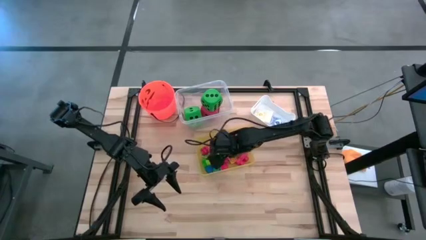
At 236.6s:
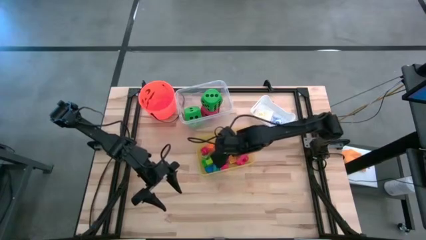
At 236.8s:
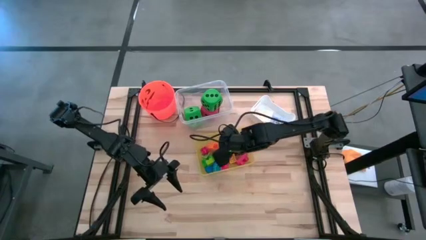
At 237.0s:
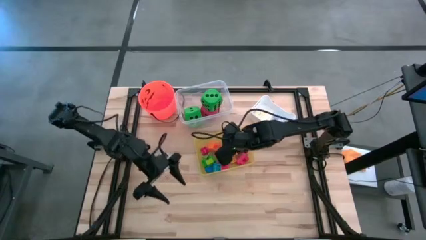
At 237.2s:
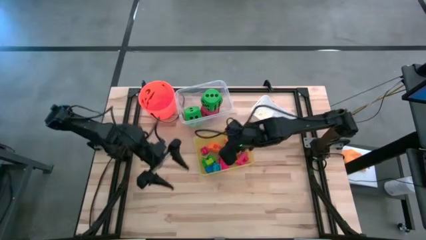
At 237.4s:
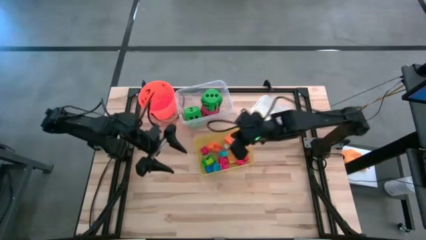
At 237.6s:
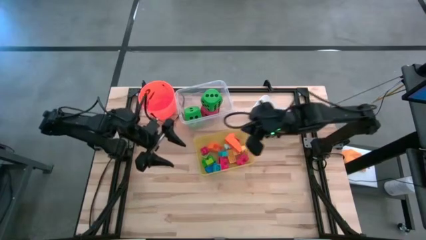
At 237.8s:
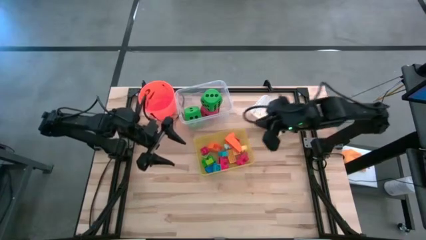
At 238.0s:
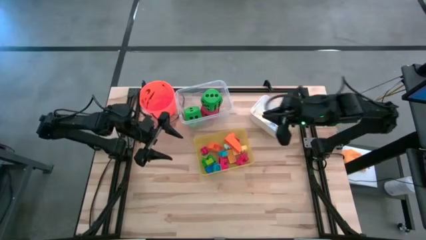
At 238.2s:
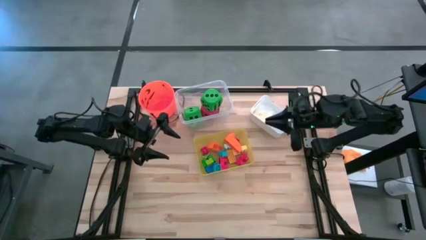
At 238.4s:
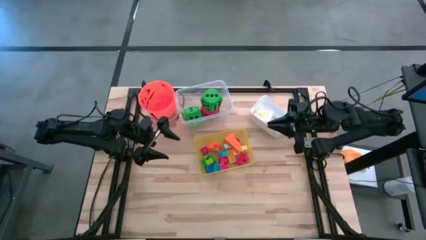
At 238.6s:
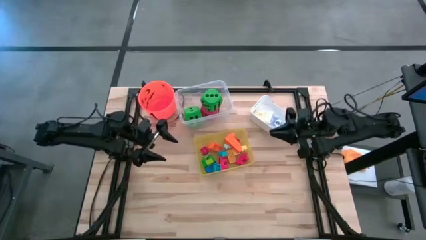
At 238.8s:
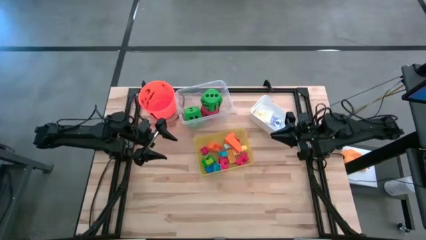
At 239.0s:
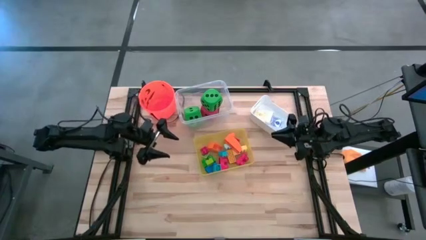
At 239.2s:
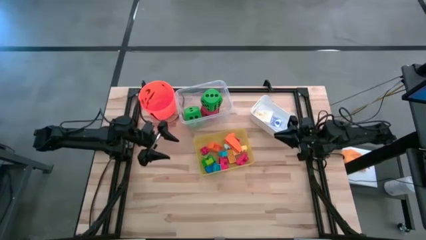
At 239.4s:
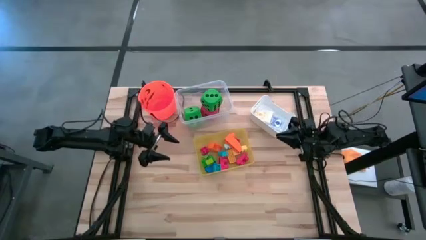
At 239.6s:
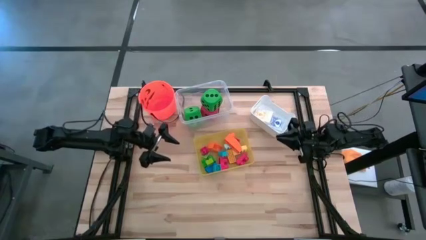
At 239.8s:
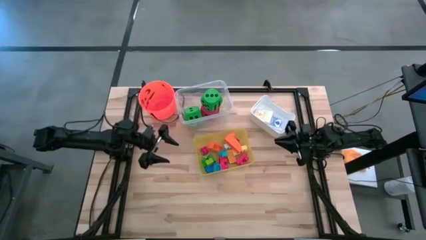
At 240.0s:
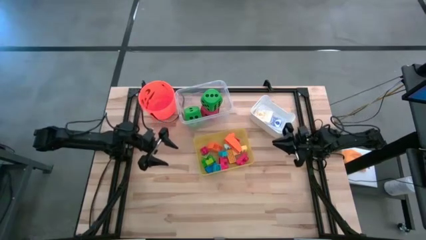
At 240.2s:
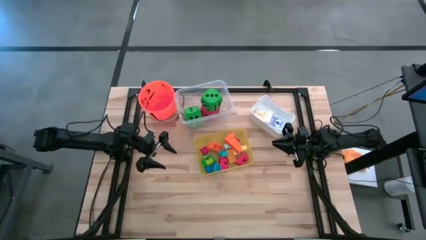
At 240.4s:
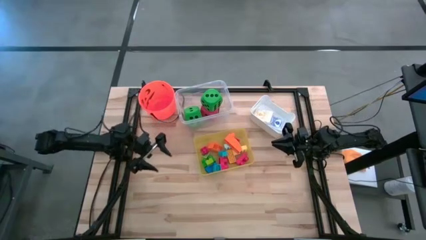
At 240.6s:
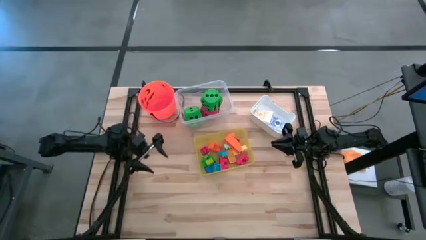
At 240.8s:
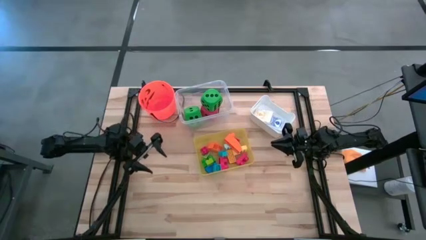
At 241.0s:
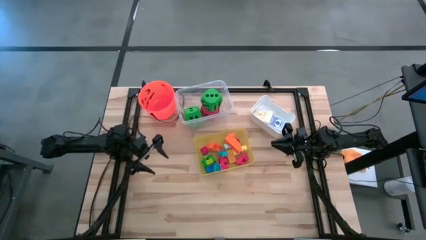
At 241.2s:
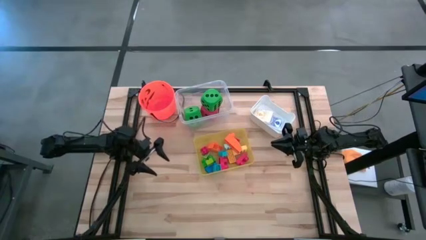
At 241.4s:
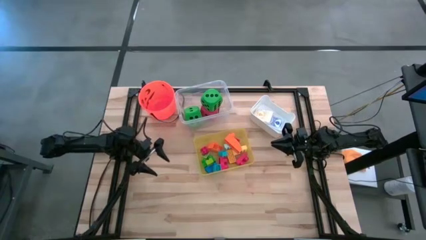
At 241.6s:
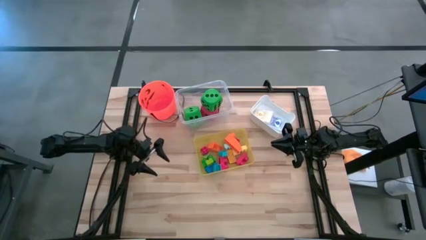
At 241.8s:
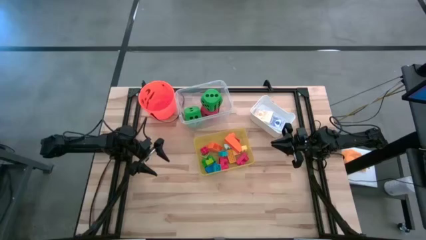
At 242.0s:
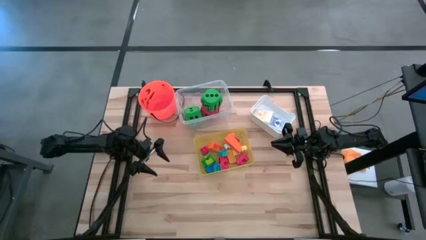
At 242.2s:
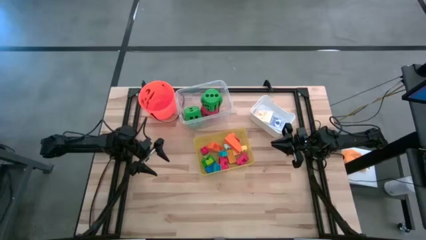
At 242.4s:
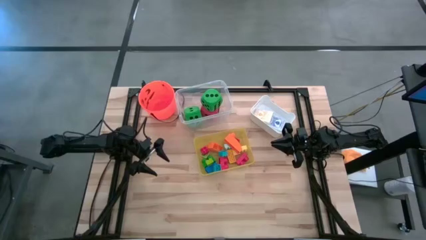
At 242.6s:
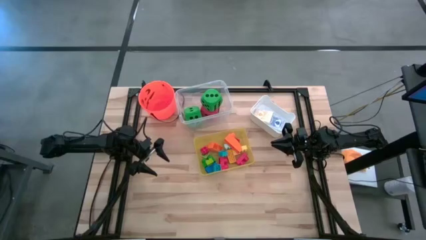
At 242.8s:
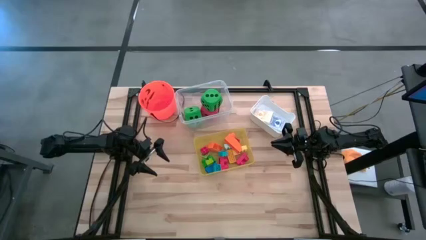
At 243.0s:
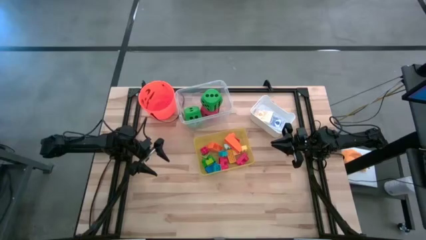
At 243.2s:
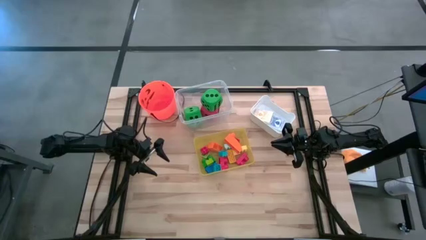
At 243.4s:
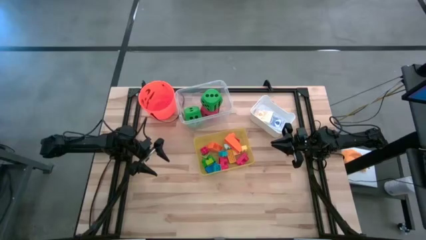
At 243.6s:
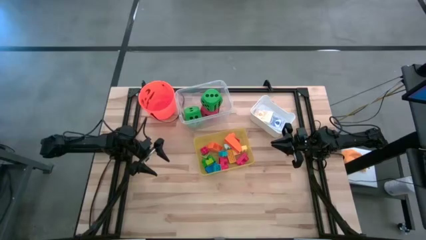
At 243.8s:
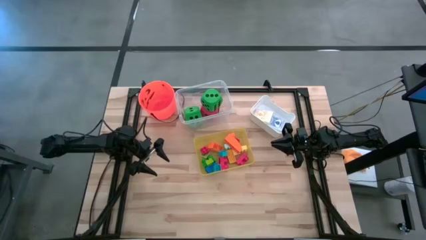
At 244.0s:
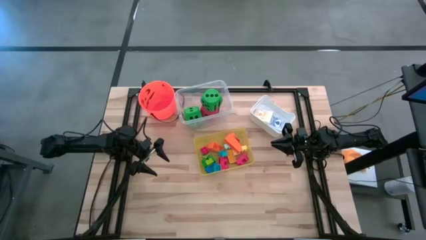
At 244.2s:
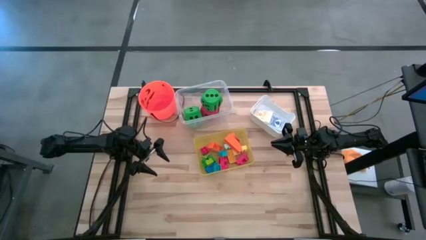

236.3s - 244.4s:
Task: Pick & Place Toys
Return to Home Position

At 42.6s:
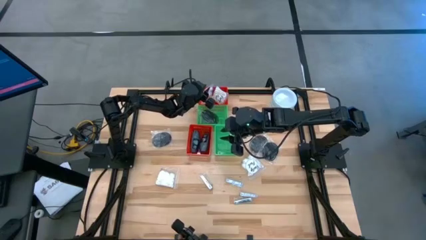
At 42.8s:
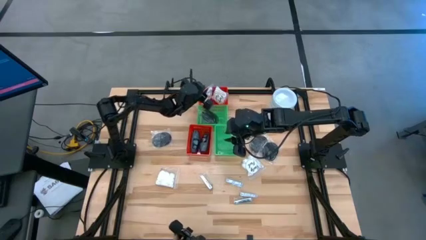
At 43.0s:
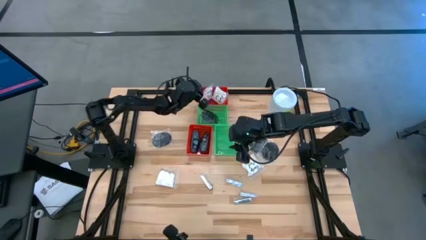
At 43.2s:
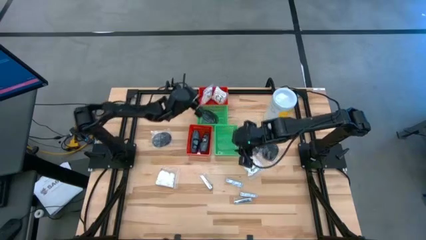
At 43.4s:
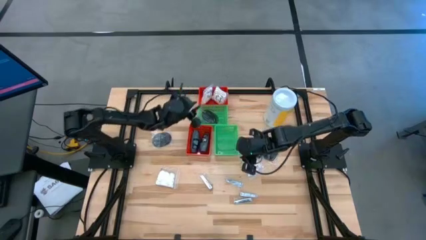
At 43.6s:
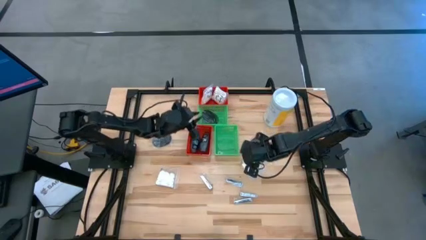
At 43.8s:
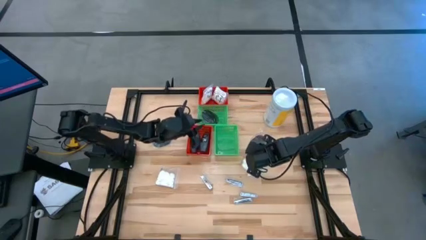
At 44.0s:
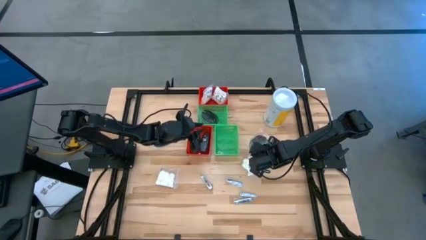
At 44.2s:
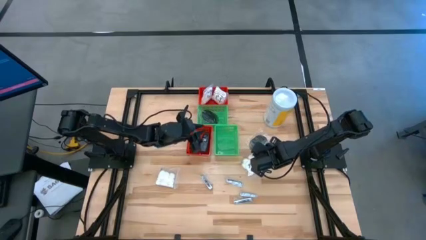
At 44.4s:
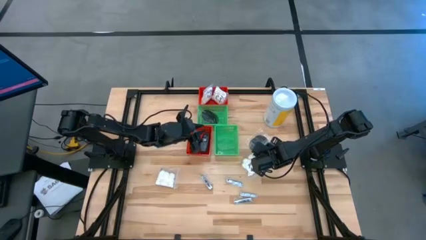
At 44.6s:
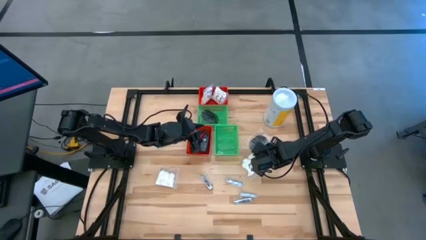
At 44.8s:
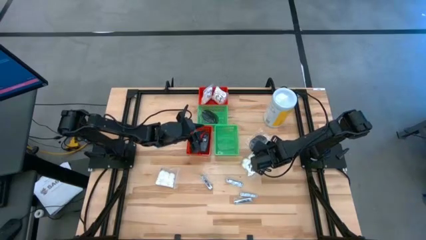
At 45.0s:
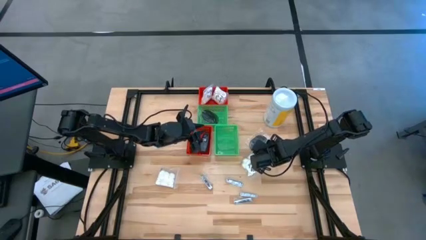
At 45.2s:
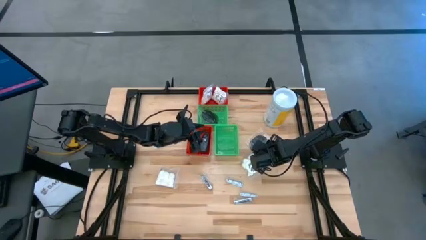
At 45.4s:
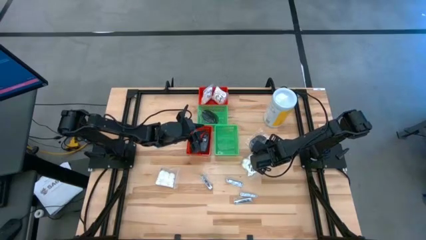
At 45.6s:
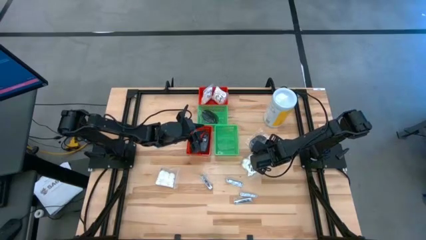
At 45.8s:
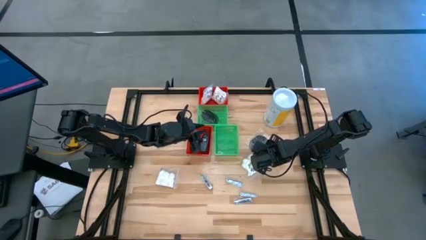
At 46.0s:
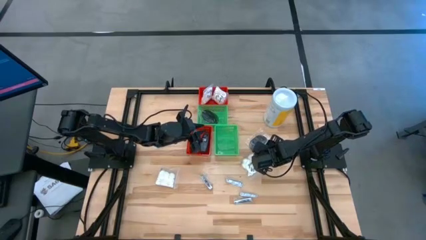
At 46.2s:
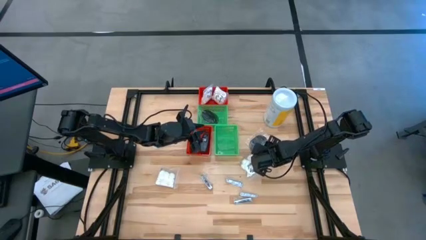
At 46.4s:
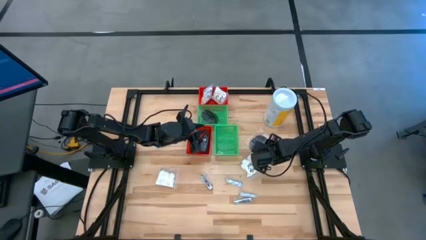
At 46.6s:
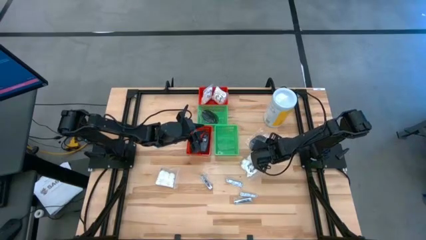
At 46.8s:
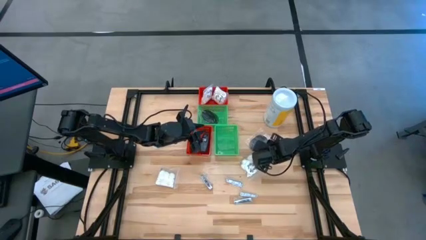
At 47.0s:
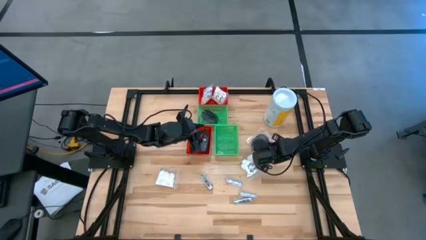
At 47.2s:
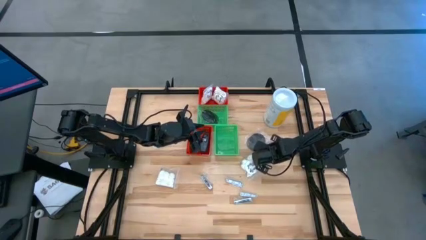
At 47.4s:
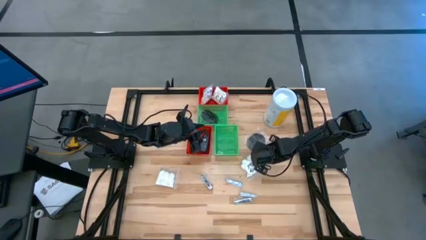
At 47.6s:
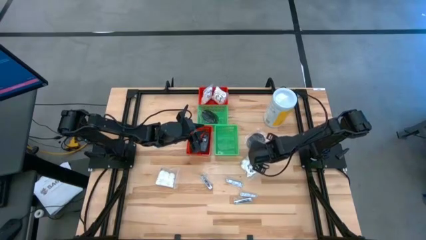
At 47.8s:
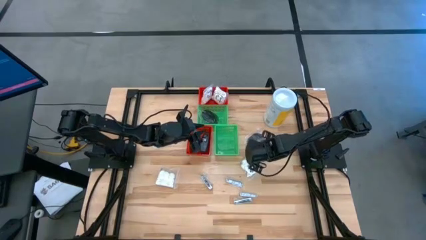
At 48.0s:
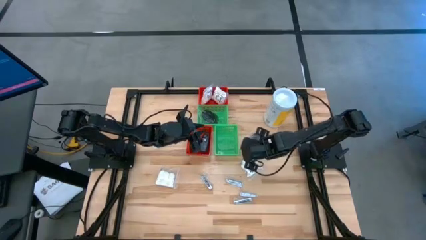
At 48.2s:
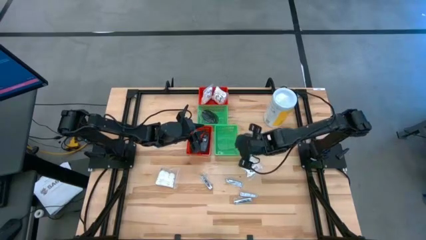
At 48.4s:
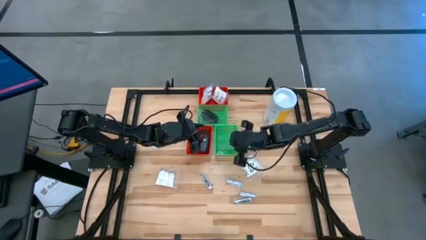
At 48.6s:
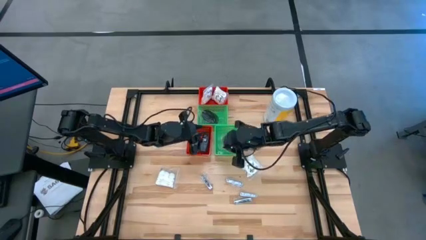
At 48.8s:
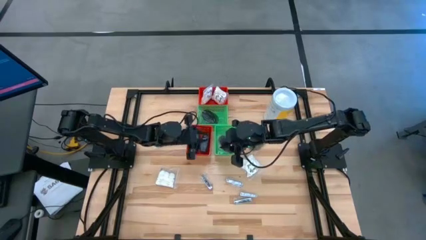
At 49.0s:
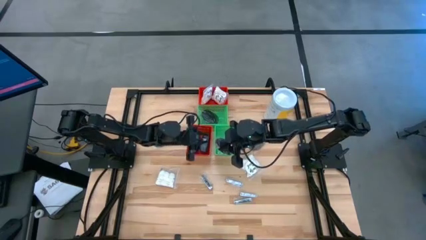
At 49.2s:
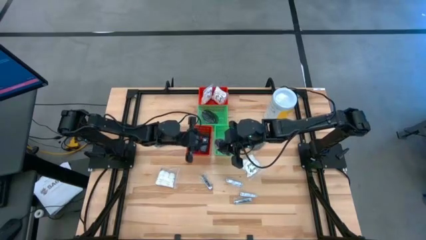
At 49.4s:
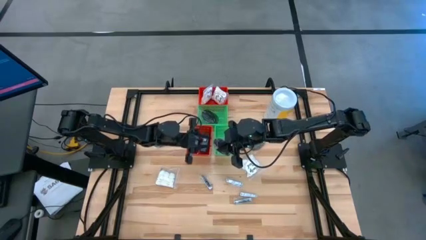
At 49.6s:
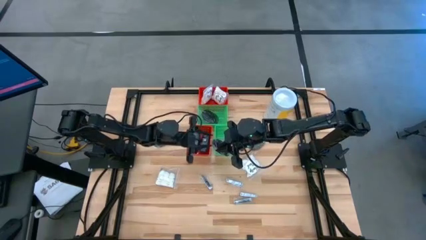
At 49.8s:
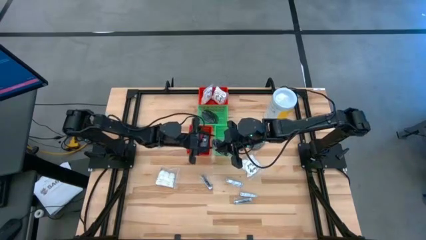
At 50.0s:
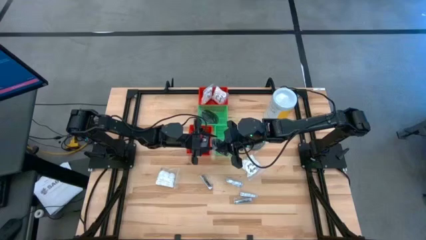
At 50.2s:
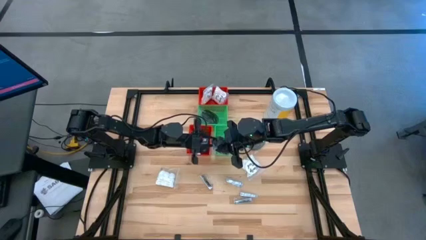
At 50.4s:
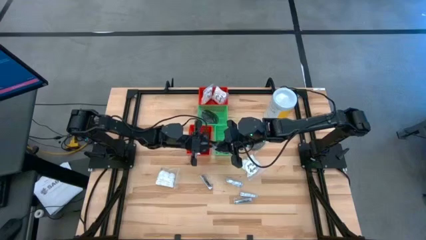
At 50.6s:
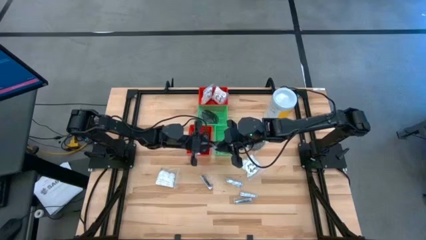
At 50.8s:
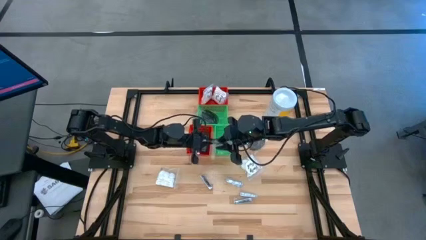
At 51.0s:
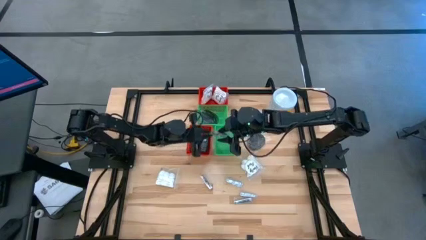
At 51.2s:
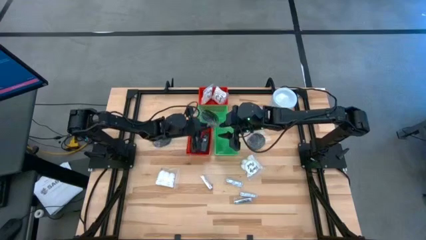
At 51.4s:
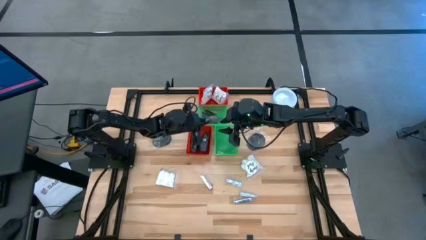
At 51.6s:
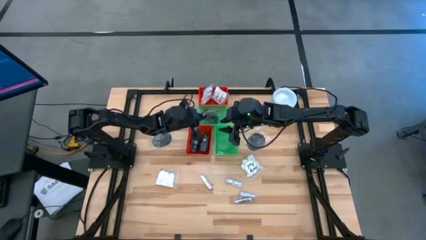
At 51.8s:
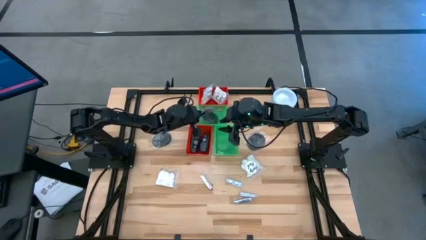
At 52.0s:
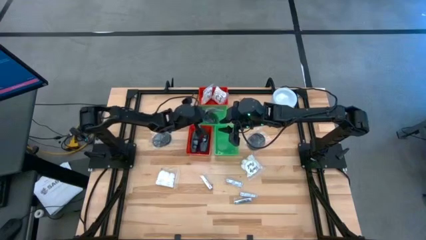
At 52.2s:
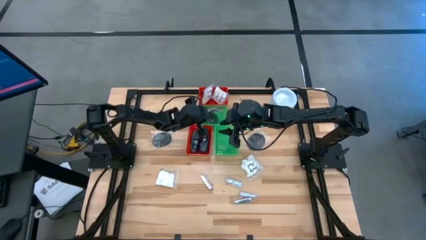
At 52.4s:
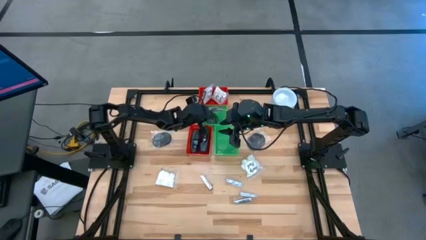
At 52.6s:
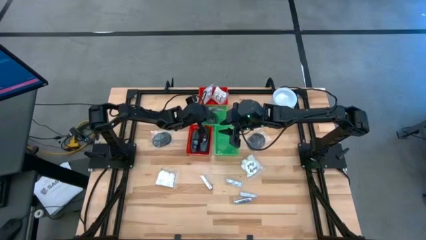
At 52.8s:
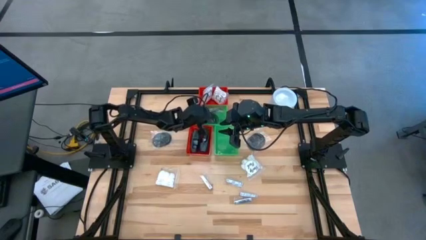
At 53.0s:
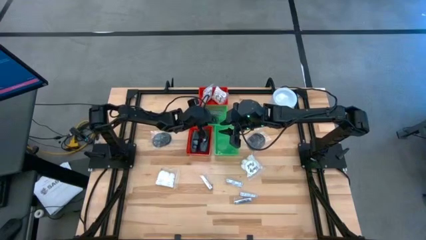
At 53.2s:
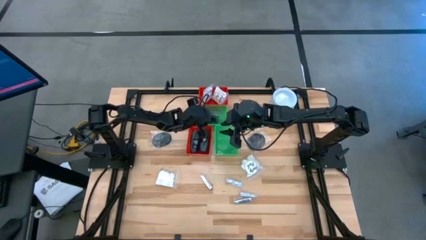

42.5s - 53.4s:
Task: Pick & Place Travel size toiletries
Put the black hairbrush into the top green bin
